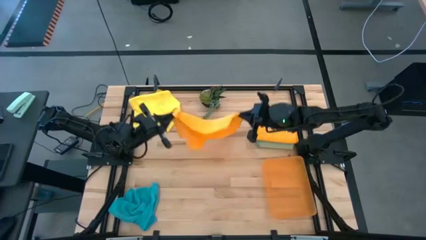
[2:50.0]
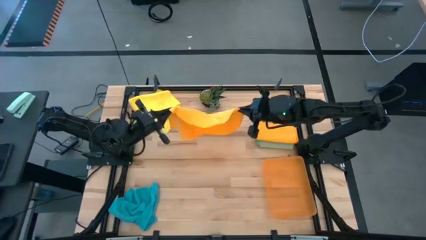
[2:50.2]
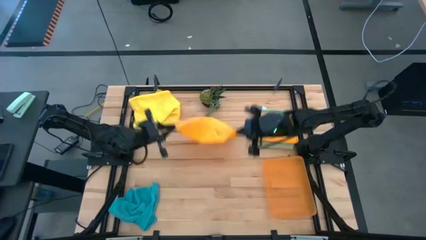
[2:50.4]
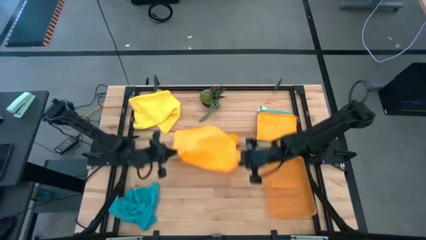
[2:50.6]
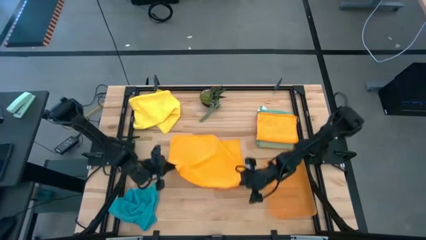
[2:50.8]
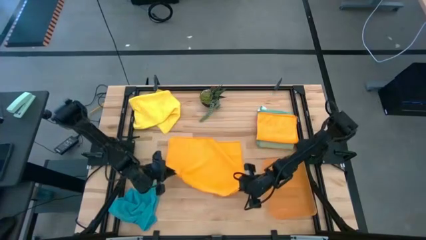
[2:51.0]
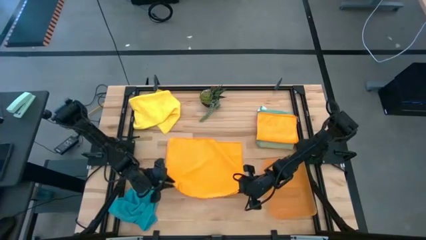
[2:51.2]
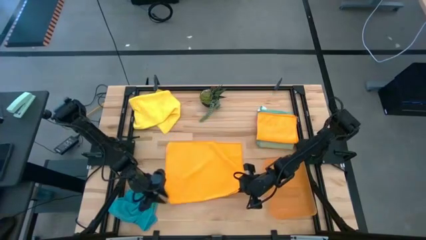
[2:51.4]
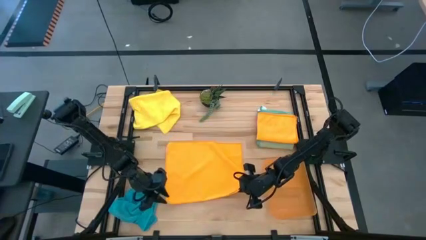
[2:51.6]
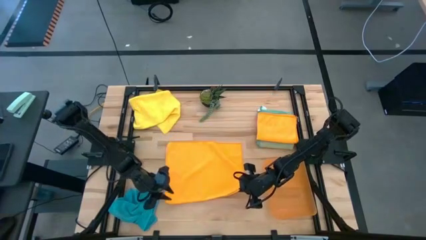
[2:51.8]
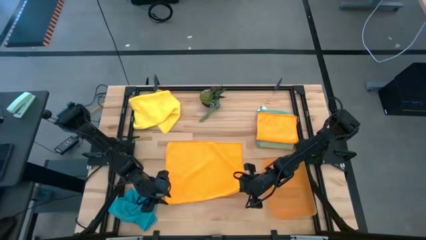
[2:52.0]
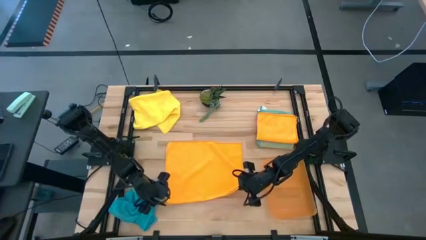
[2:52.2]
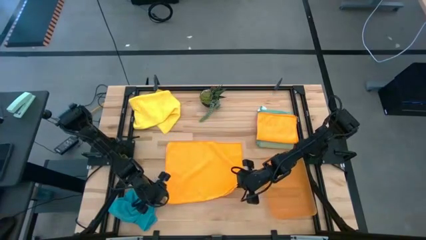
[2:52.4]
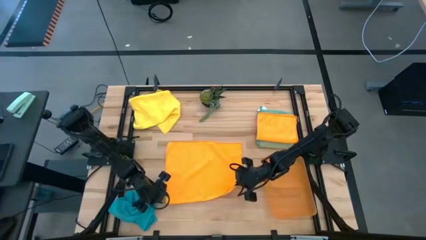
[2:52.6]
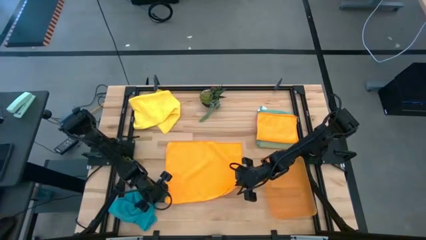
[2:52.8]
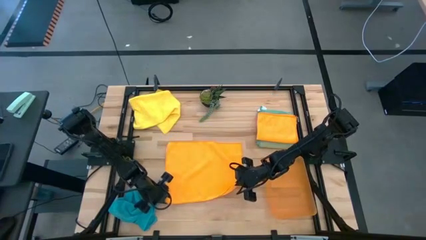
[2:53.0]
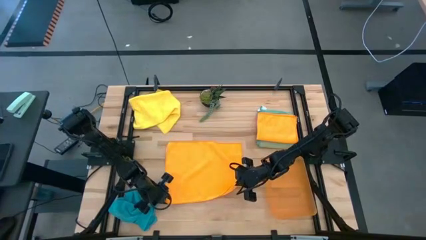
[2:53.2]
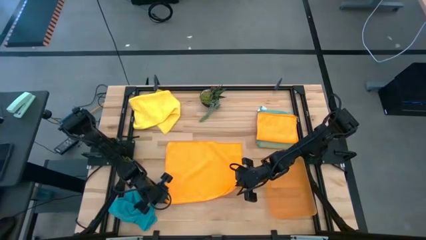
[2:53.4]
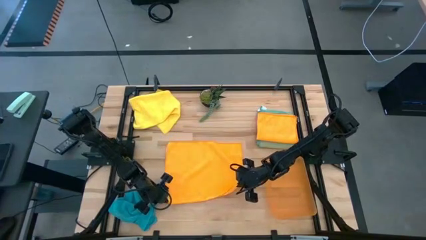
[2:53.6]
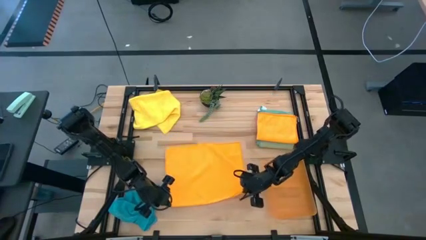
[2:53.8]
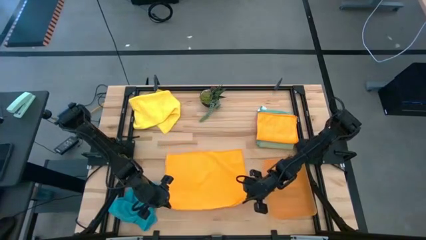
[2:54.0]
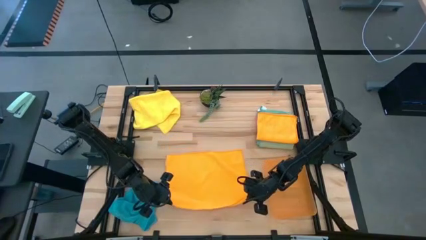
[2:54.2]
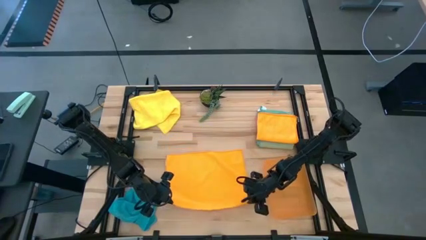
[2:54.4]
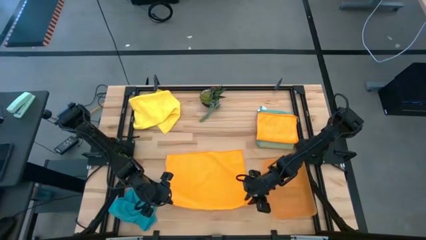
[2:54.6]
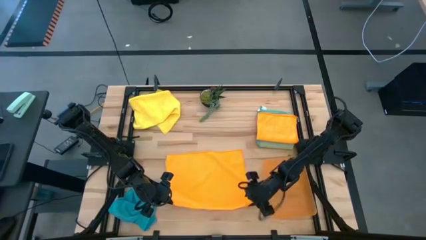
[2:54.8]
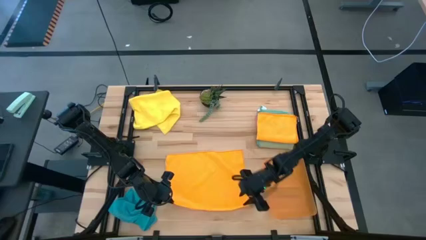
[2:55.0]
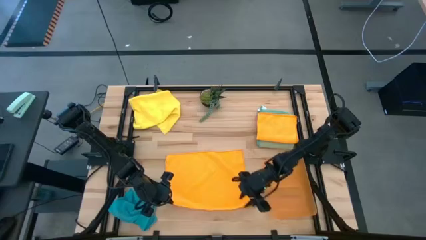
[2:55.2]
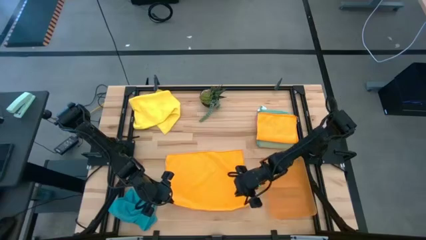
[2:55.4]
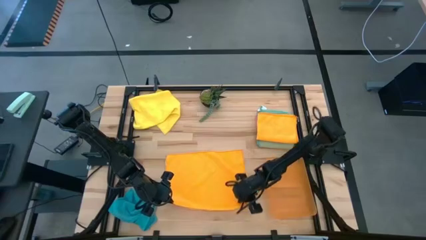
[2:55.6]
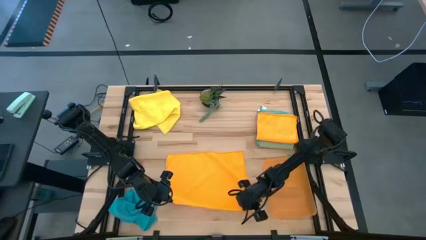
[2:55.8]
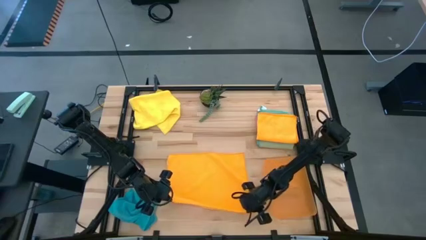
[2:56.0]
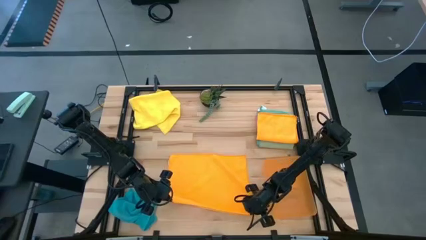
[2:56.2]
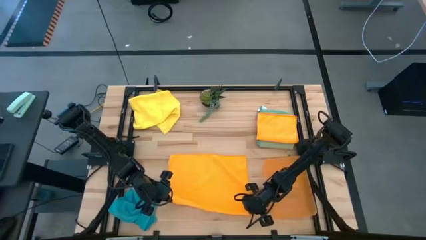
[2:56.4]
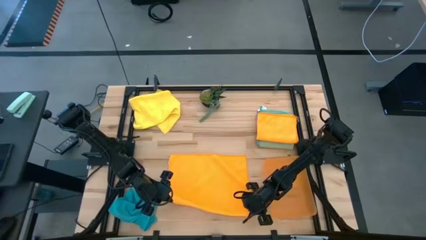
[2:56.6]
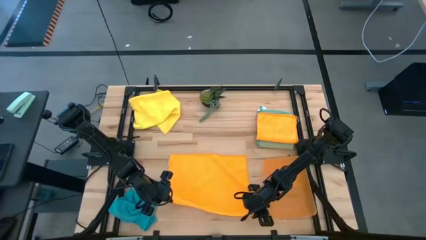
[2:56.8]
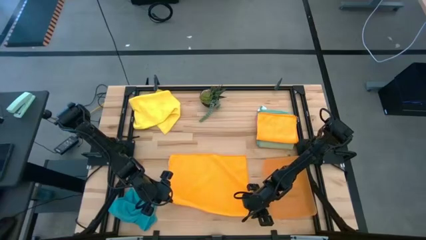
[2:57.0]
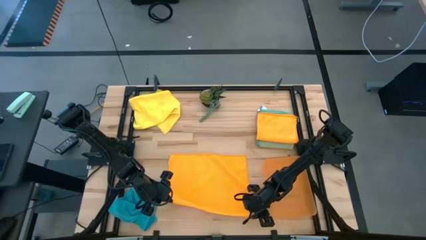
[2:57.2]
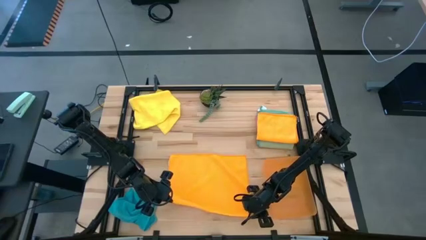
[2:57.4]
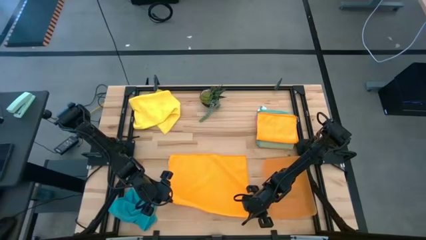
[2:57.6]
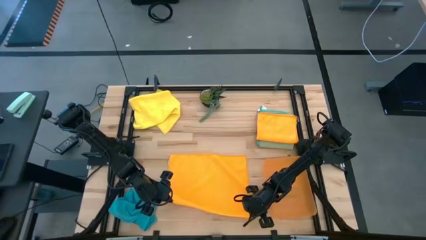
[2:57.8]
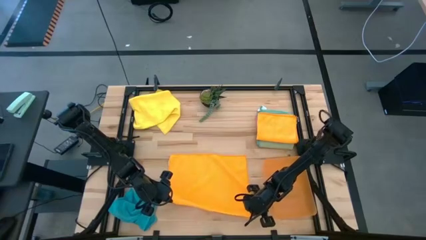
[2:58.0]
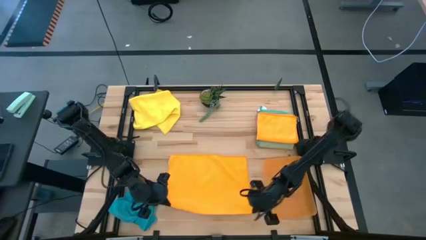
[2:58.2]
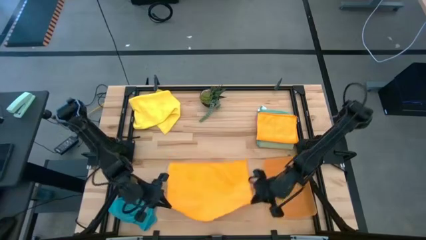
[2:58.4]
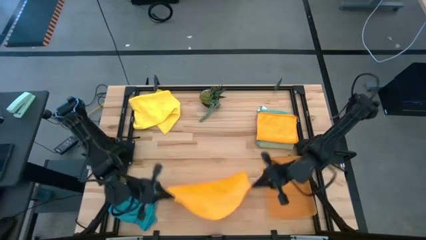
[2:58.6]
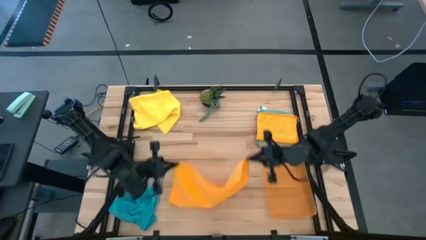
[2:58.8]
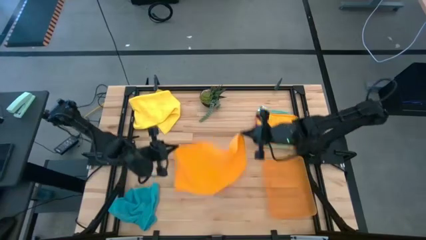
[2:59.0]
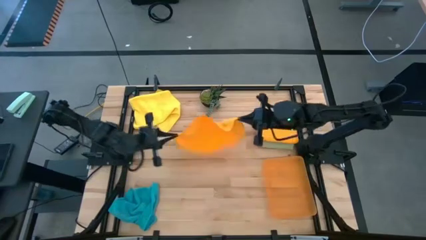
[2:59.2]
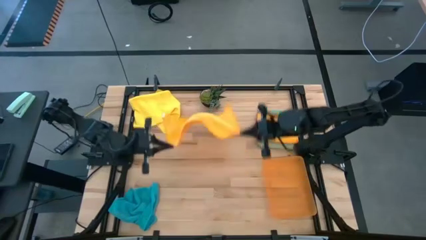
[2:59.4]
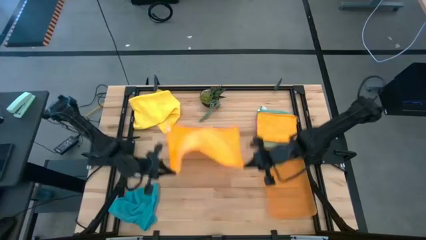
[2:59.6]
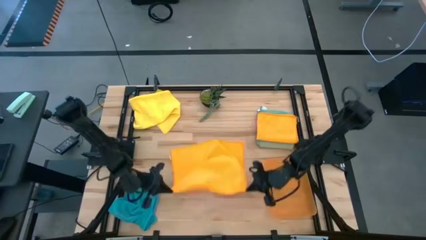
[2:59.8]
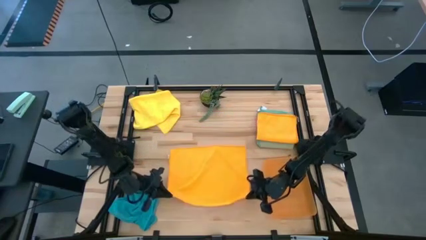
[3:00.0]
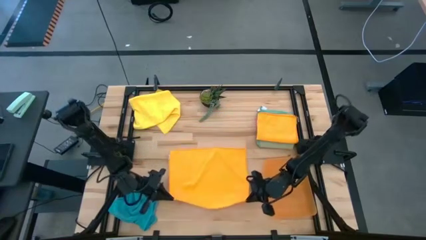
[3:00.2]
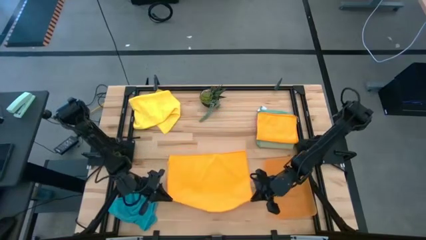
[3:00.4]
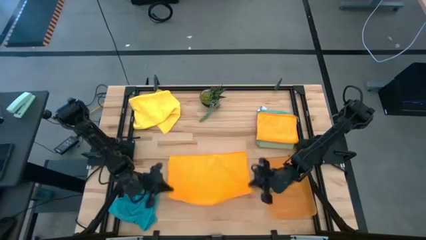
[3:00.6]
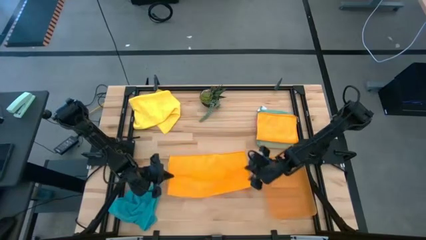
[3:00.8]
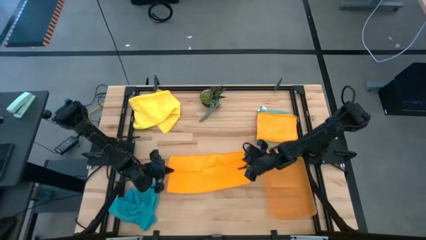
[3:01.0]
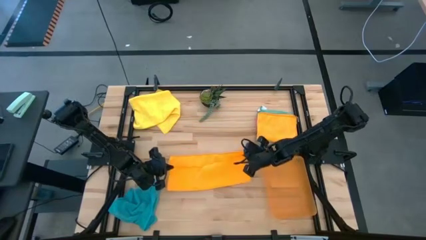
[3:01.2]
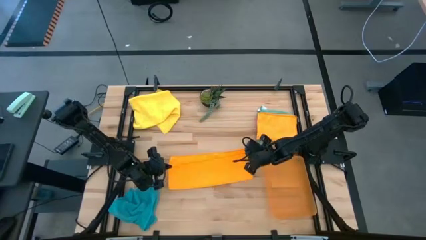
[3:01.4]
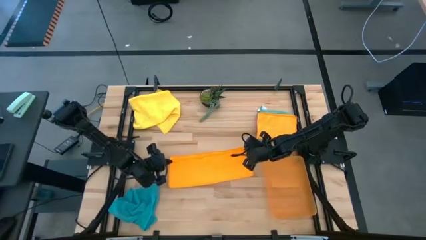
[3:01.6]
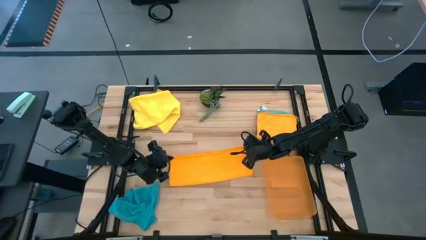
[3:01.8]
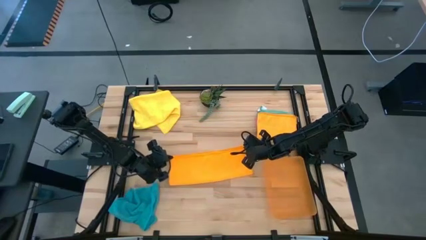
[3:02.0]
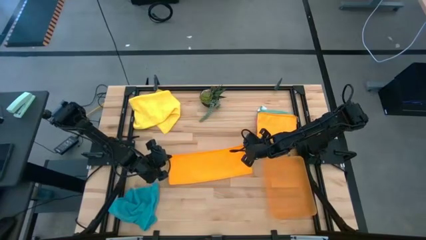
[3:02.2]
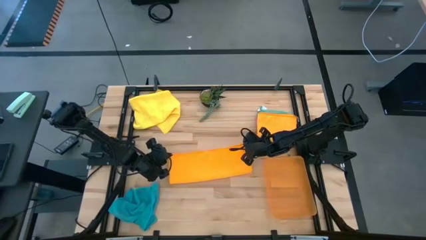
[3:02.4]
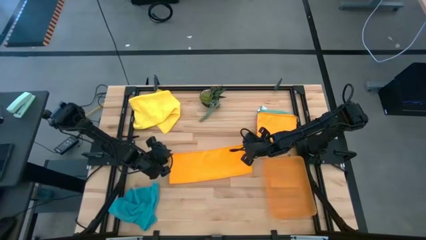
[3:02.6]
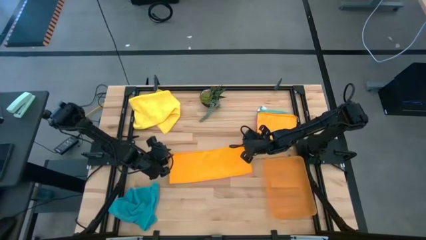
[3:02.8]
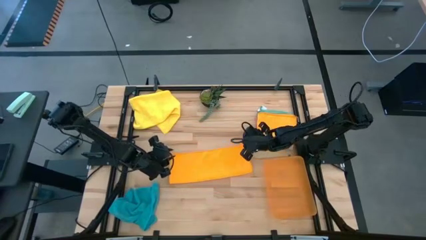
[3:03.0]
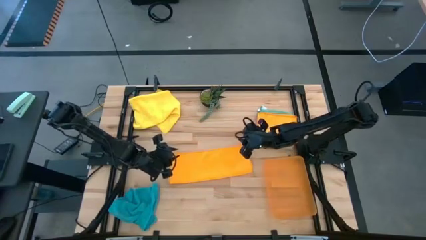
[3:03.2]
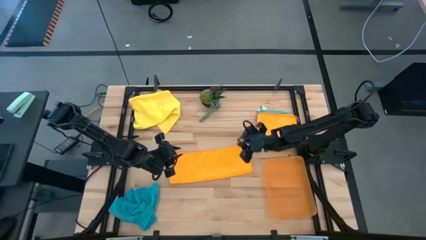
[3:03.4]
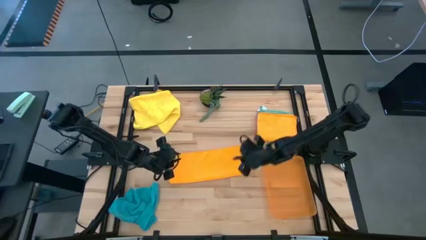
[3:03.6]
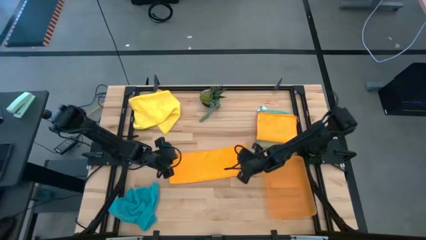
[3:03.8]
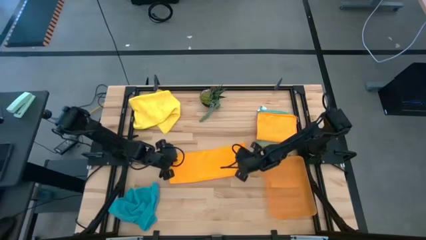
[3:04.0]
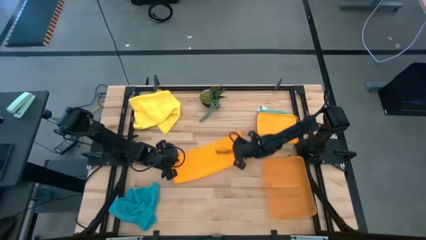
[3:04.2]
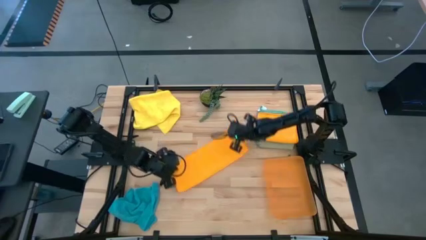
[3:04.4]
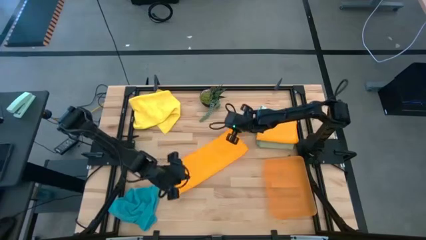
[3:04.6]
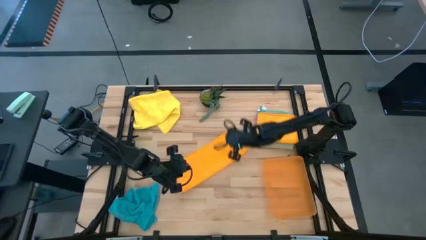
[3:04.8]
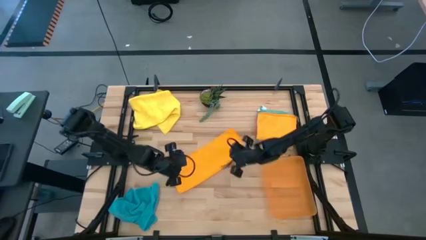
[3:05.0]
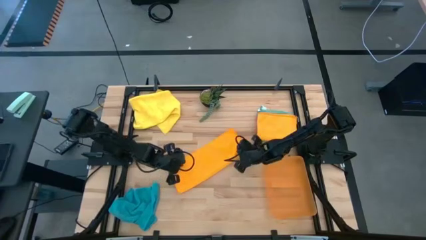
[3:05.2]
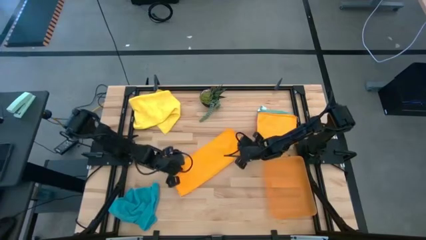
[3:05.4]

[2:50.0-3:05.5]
Task: Fold microfiber towels
Fold the orange microfiber towel

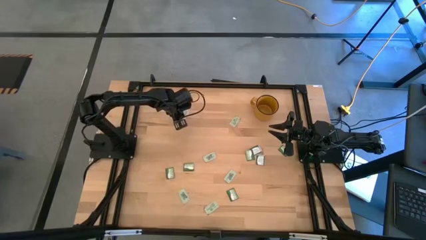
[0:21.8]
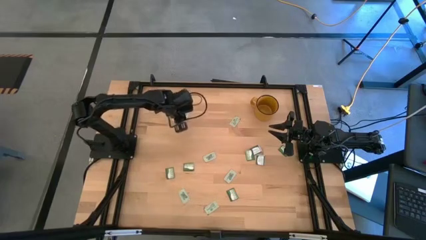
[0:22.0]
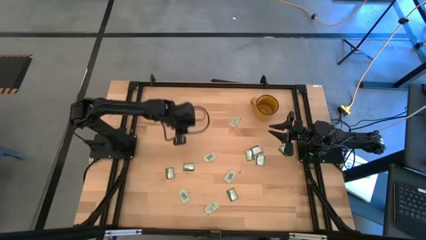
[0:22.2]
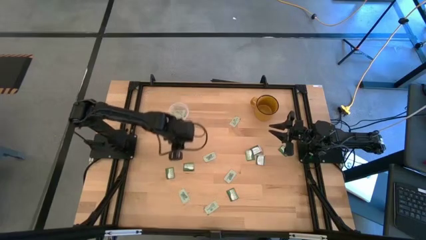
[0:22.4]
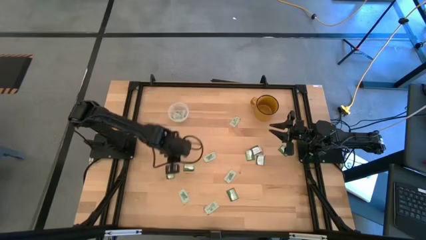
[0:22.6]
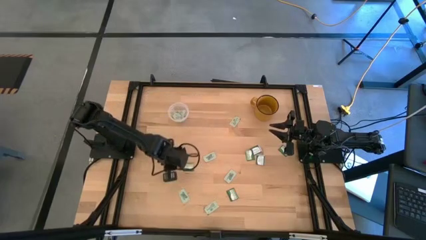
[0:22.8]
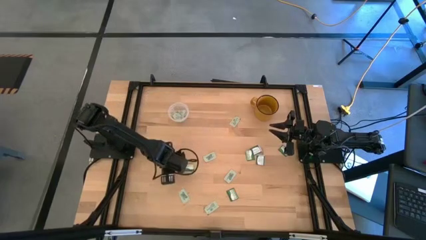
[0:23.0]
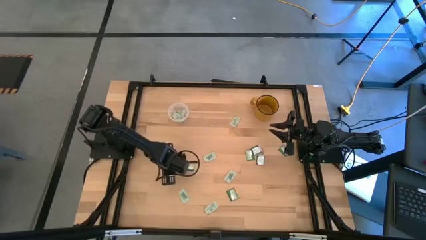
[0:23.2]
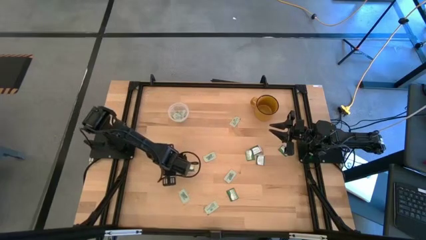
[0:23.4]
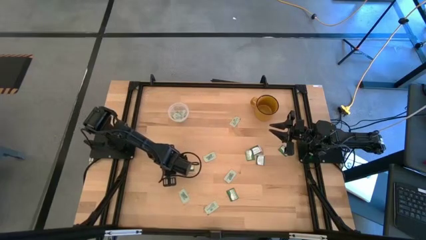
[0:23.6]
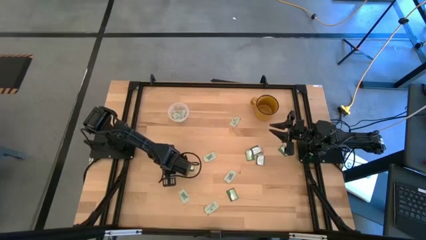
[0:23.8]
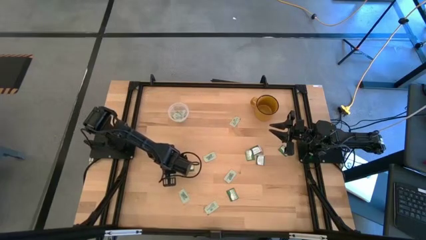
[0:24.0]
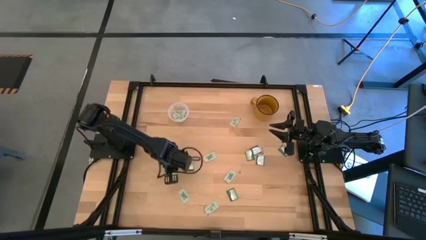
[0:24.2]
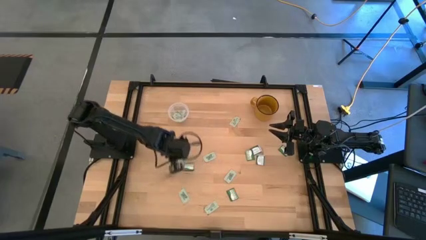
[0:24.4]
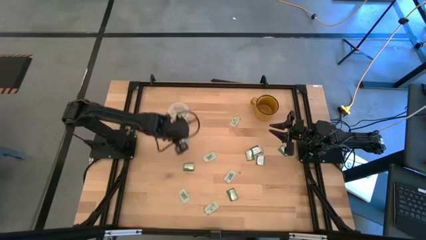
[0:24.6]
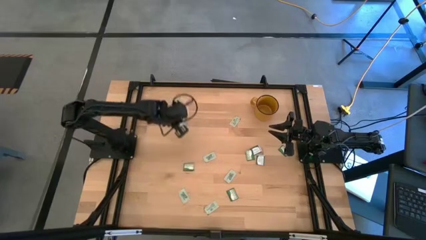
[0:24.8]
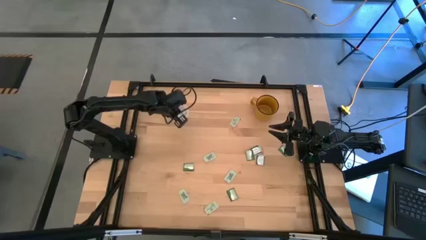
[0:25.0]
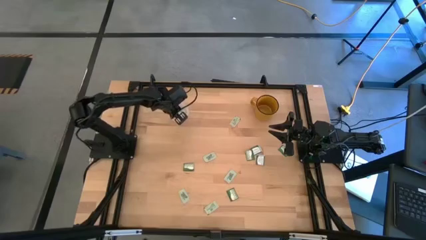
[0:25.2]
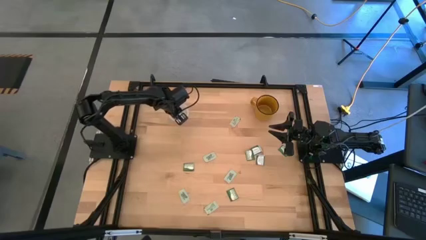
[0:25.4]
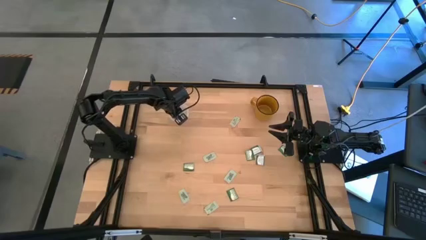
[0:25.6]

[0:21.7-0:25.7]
Task: Pick and place Stevia / Truvia into bins
Put the truvia packet into the transparent container
